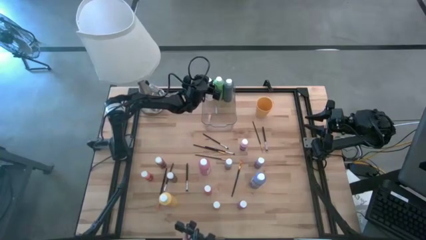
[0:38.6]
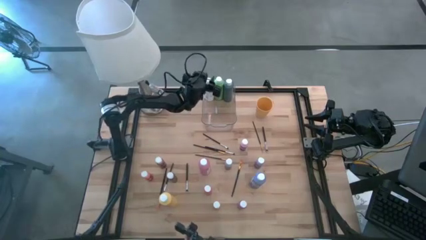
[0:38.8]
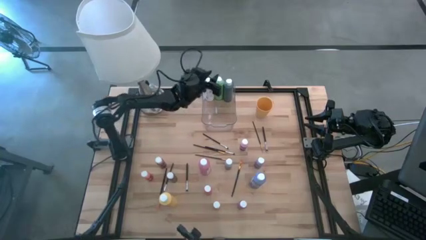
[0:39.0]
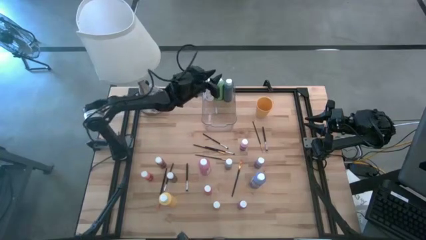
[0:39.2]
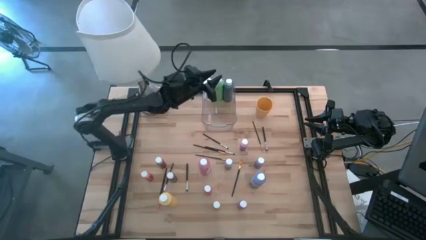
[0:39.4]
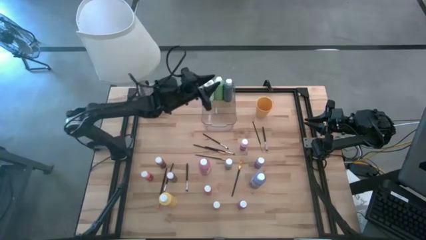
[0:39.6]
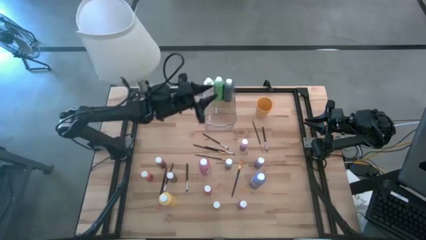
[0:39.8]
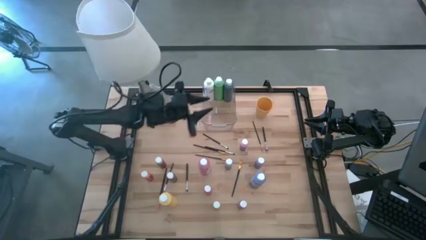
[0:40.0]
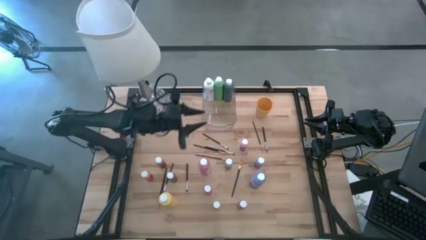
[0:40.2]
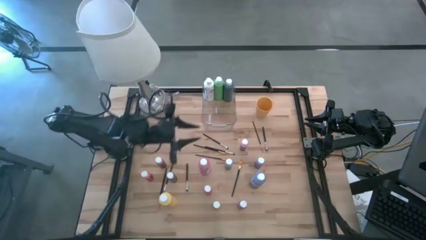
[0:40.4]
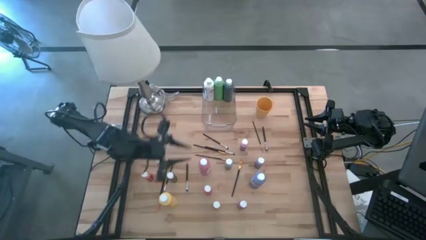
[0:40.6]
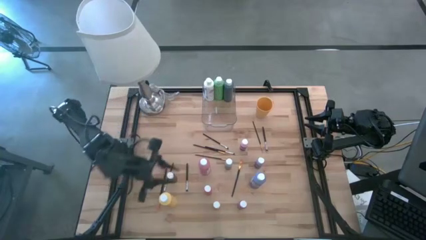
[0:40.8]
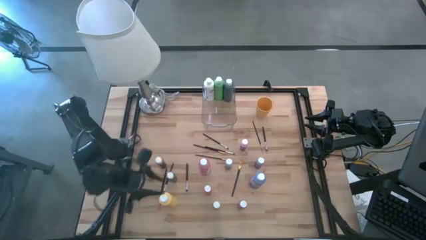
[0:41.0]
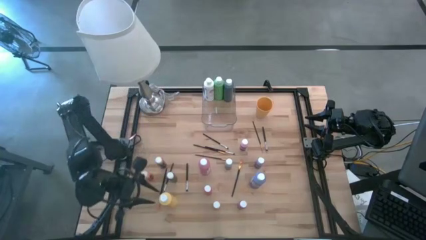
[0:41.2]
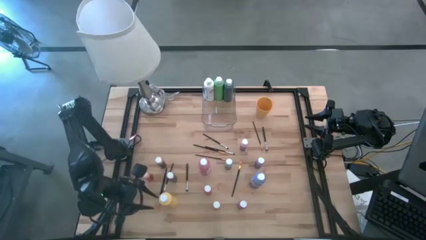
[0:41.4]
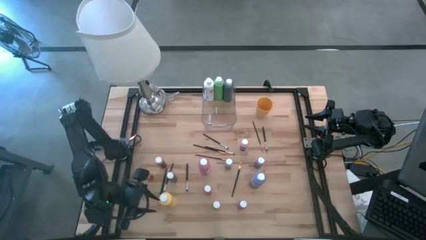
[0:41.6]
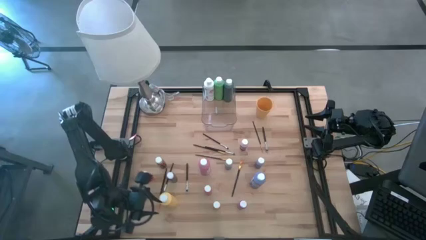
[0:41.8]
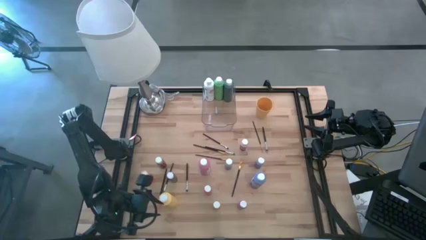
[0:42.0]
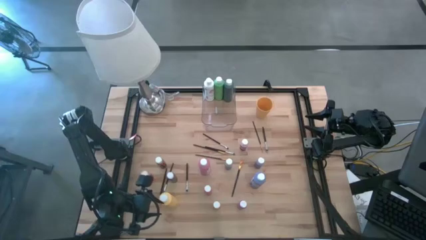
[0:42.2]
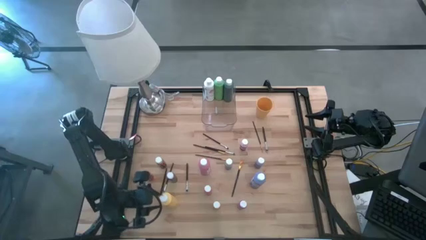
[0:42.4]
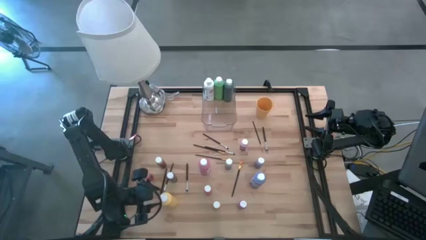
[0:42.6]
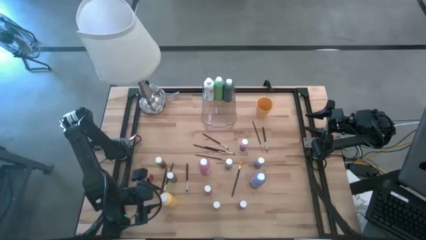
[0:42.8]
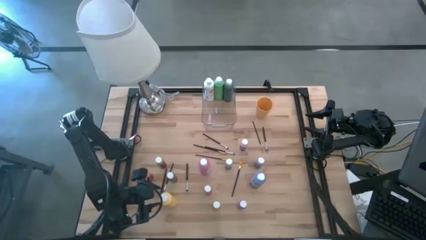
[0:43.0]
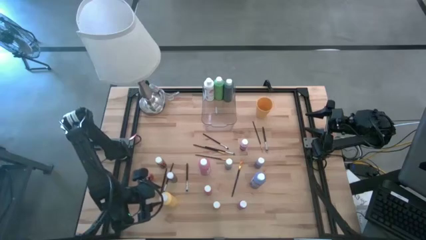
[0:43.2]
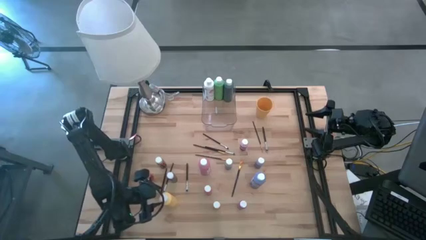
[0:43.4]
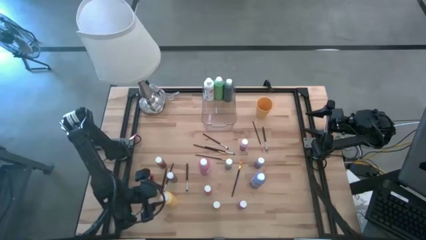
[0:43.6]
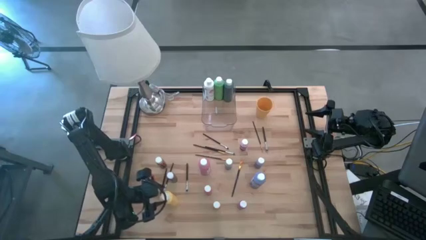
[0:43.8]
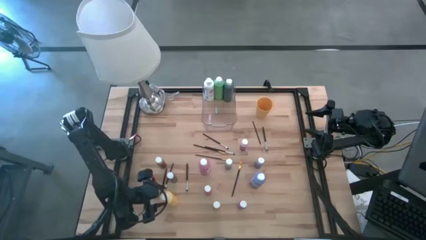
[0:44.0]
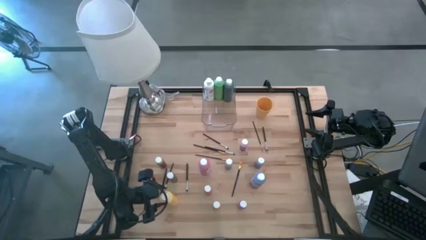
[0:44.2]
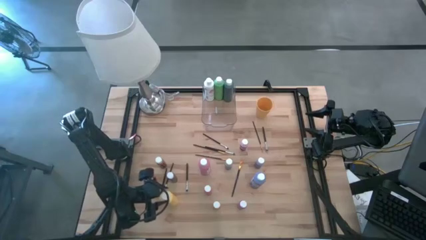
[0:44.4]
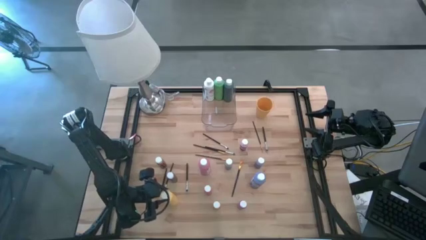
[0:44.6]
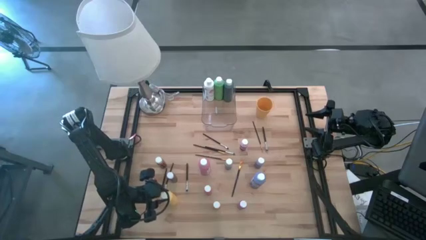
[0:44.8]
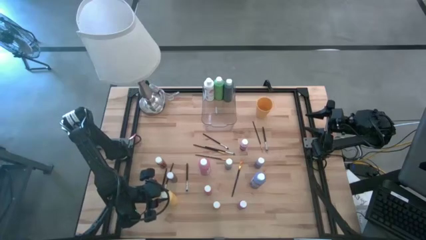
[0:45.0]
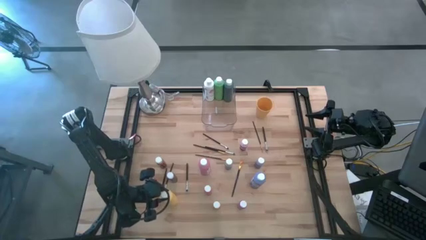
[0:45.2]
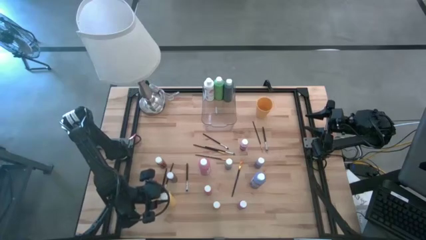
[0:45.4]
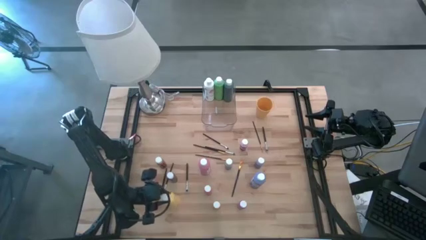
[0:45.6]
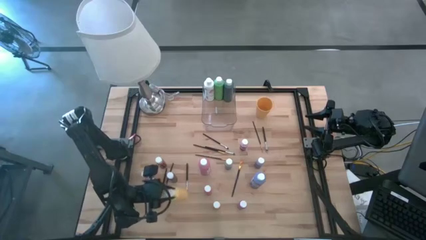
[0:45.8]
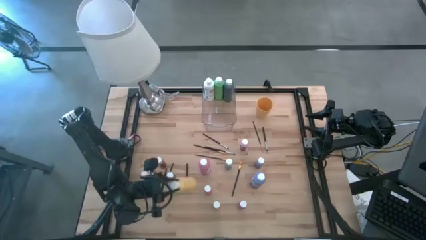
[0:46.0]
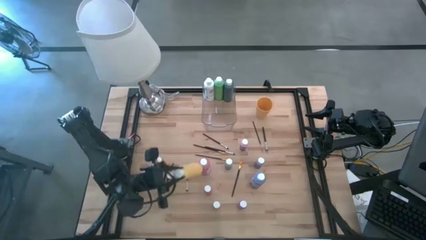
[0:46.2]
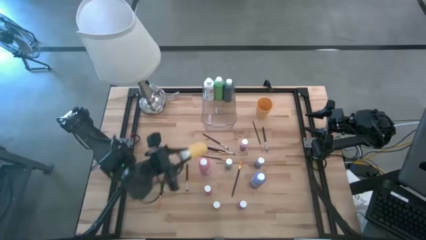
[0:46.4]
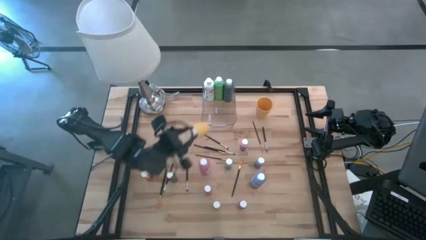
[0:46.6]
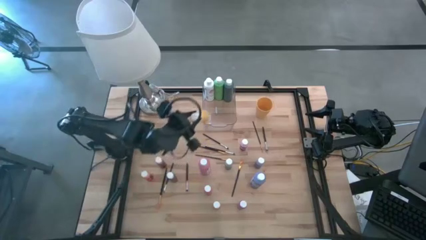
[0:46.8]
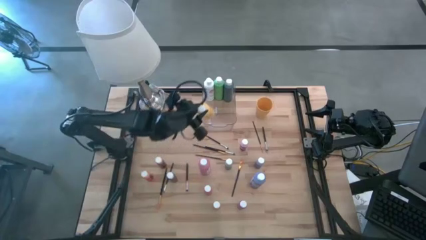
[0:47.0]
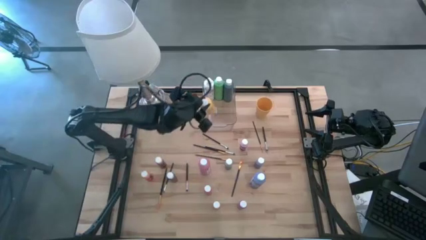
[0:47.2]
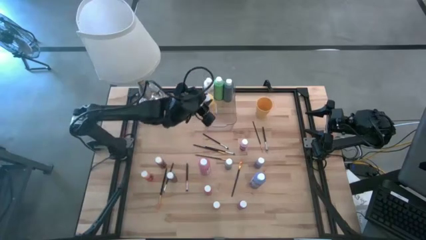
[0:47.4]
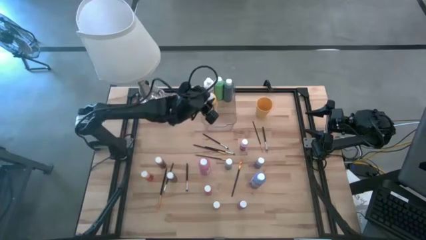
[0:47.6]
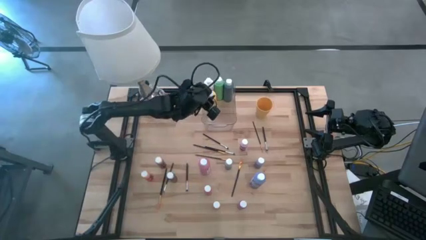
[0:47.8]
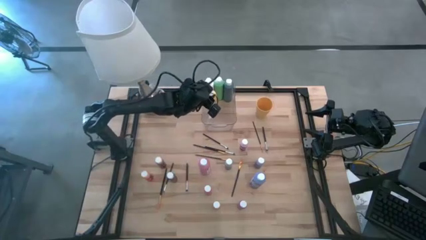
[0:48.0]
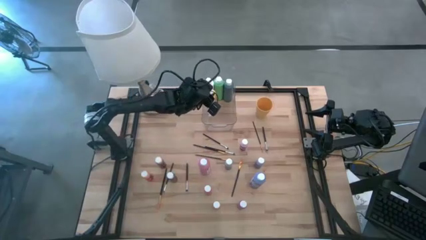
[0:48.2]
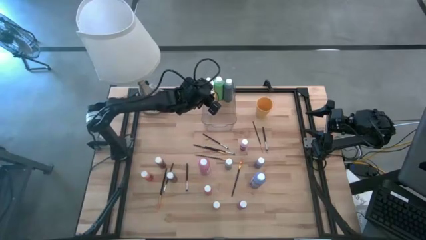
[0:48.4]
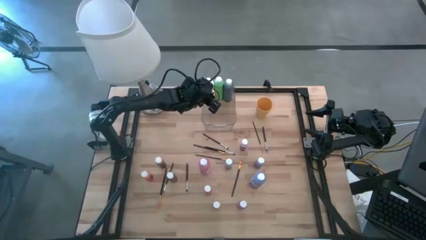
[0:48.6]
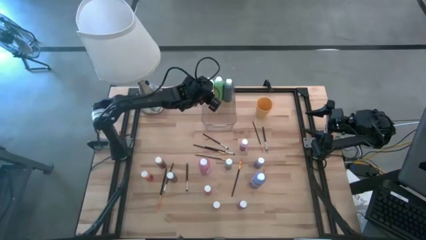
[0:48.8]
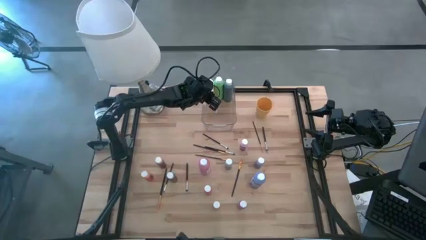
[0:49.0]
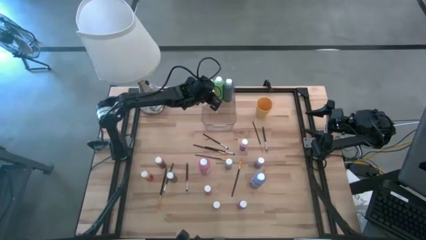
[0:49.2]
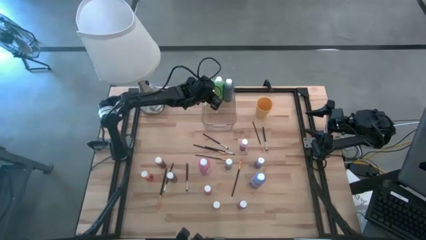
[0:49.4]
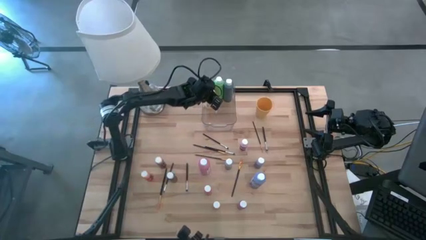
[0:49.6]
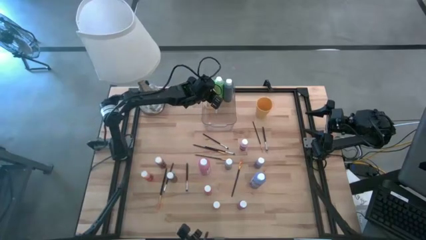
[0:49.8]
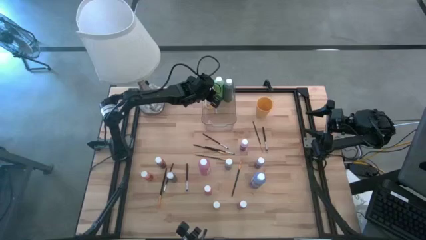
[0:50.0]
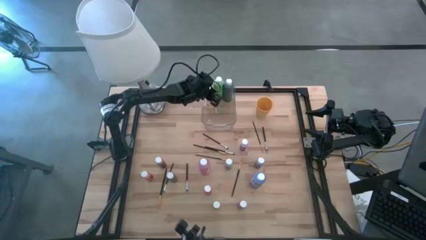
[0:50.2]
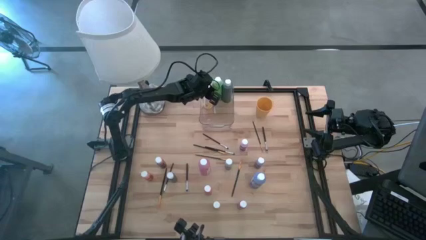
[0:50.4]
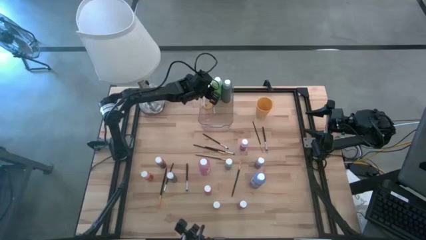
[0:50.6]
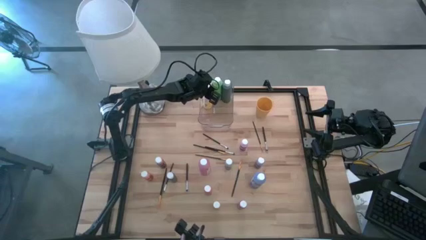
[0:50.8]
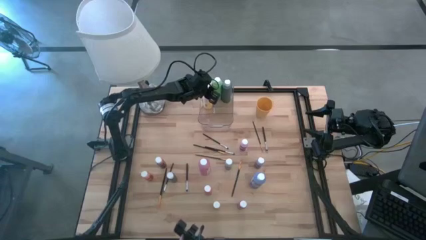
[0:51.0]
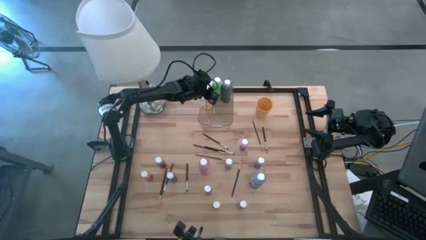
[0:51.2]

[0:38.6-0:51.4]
Task: Pick & Place Paint Supplies
Put the big yellow paint bottle into the bin
